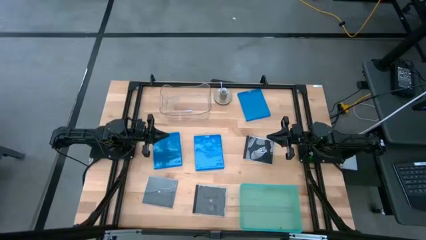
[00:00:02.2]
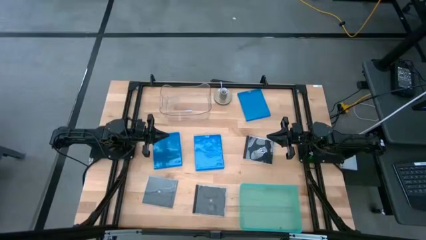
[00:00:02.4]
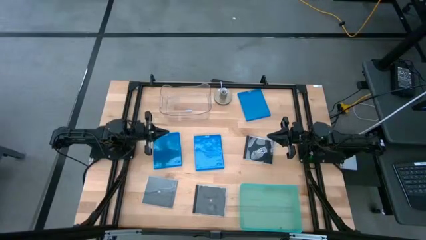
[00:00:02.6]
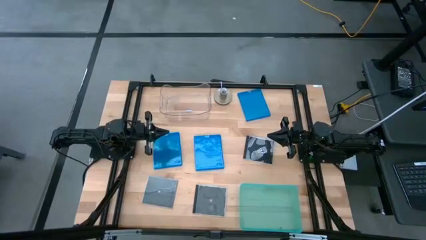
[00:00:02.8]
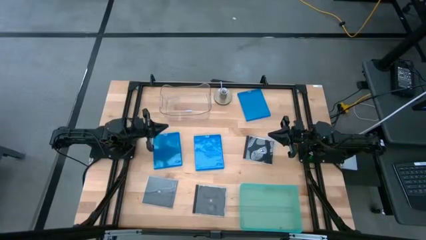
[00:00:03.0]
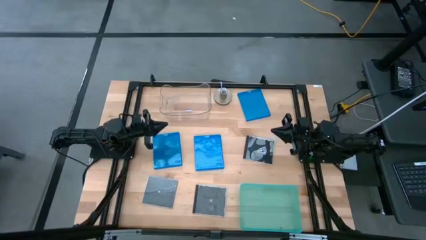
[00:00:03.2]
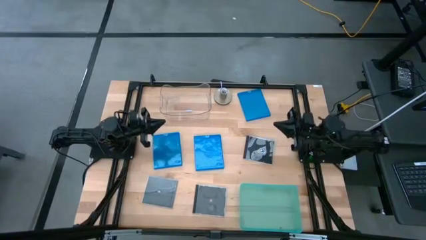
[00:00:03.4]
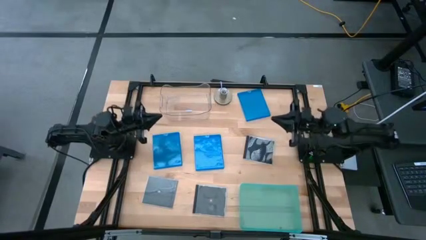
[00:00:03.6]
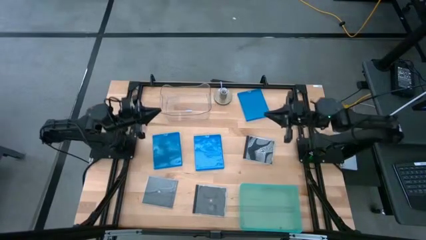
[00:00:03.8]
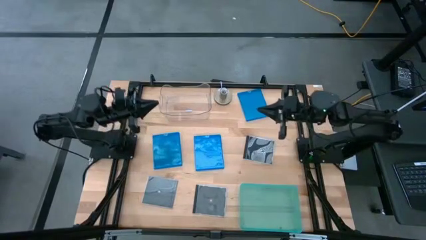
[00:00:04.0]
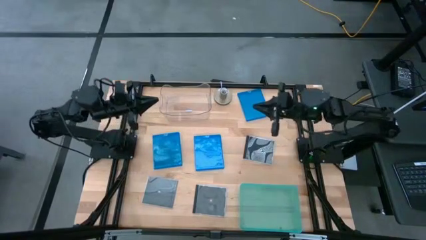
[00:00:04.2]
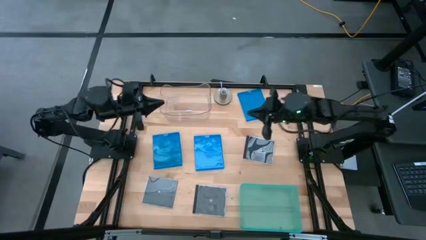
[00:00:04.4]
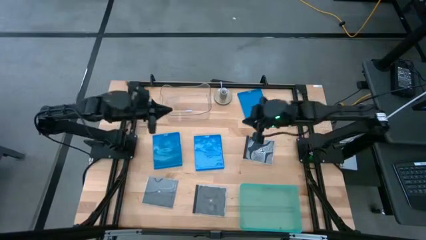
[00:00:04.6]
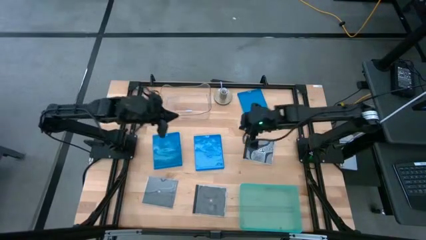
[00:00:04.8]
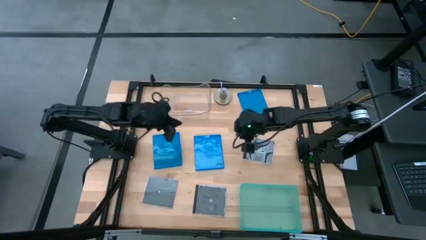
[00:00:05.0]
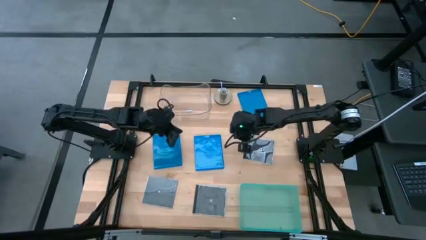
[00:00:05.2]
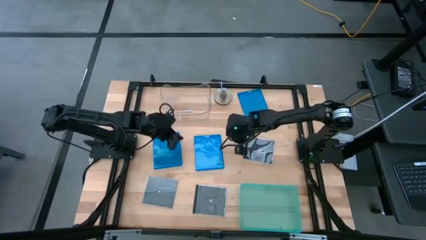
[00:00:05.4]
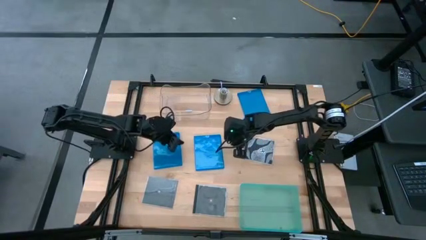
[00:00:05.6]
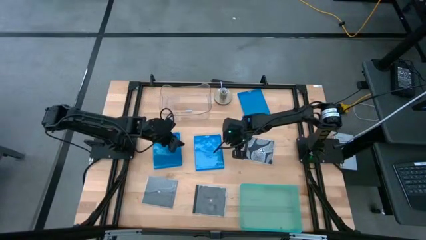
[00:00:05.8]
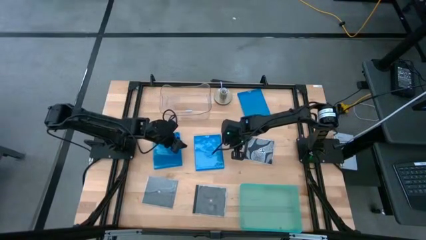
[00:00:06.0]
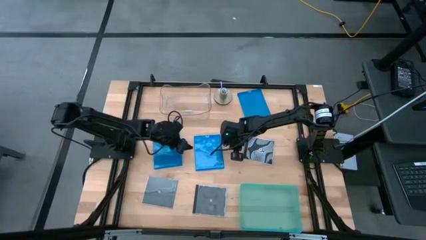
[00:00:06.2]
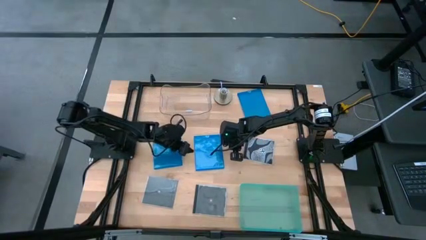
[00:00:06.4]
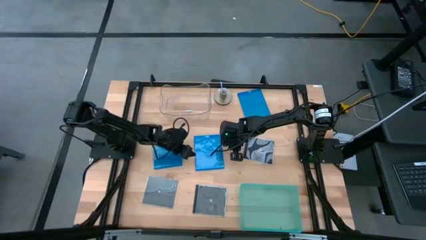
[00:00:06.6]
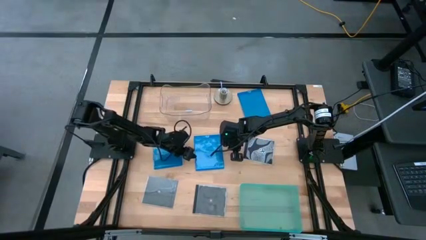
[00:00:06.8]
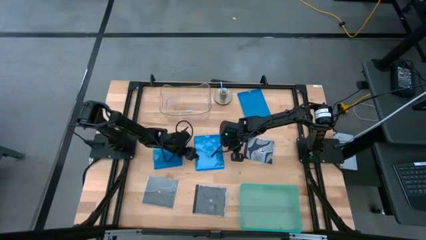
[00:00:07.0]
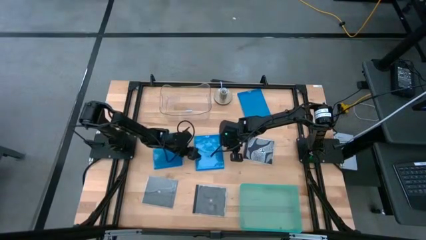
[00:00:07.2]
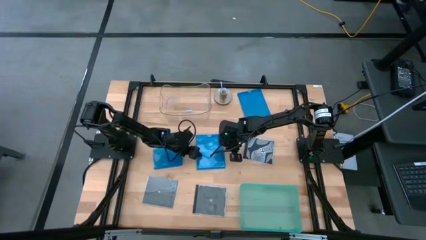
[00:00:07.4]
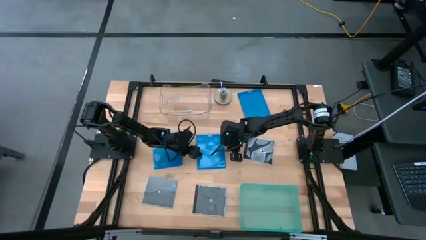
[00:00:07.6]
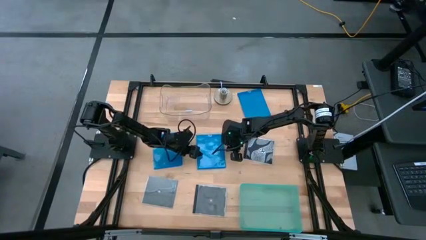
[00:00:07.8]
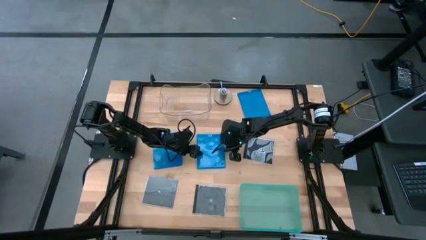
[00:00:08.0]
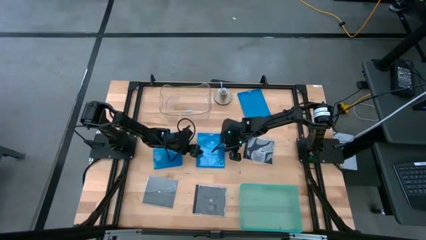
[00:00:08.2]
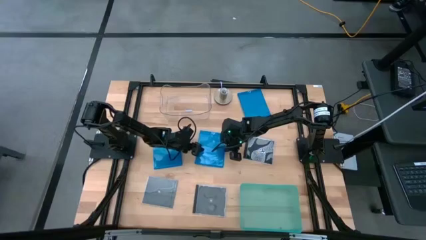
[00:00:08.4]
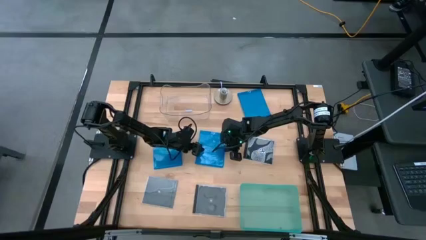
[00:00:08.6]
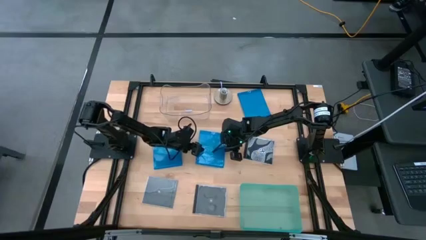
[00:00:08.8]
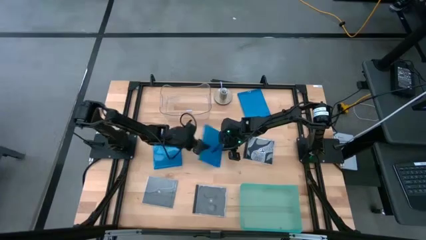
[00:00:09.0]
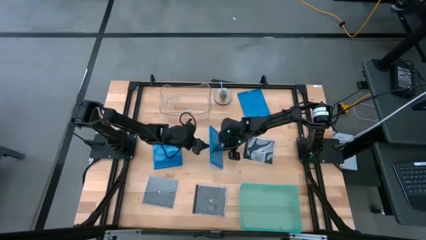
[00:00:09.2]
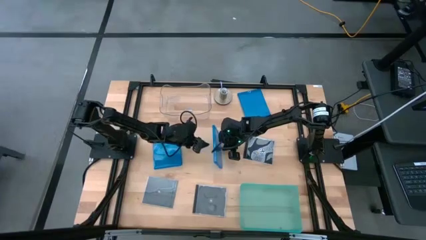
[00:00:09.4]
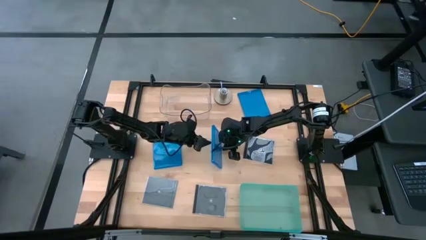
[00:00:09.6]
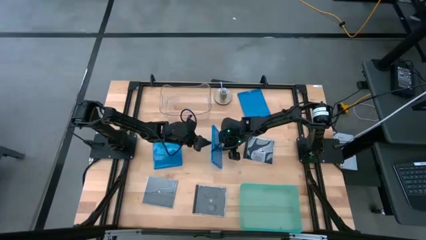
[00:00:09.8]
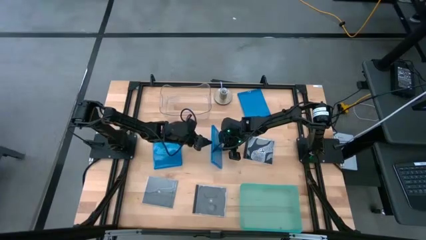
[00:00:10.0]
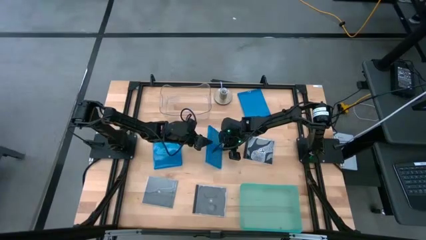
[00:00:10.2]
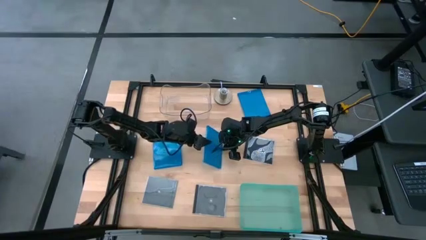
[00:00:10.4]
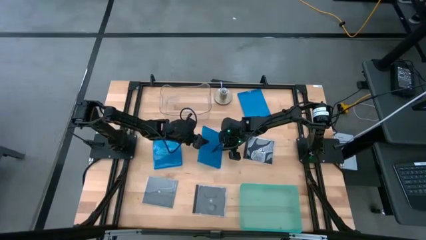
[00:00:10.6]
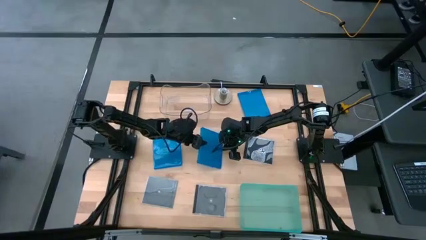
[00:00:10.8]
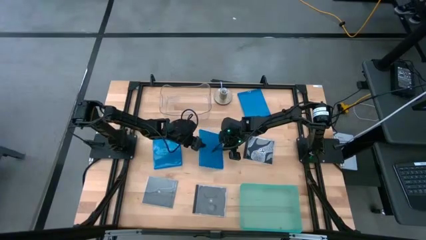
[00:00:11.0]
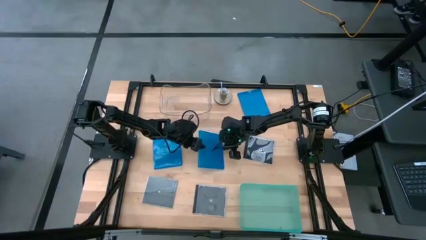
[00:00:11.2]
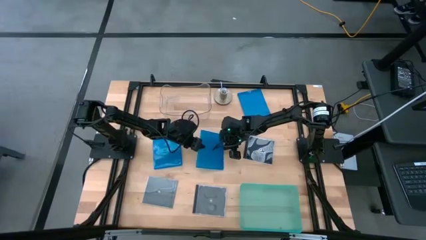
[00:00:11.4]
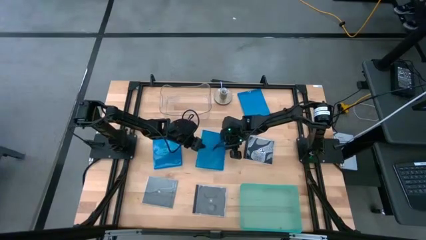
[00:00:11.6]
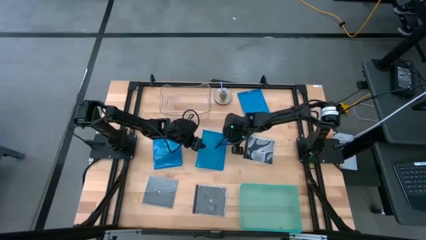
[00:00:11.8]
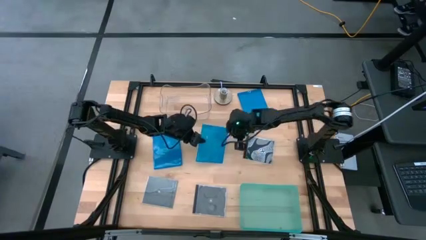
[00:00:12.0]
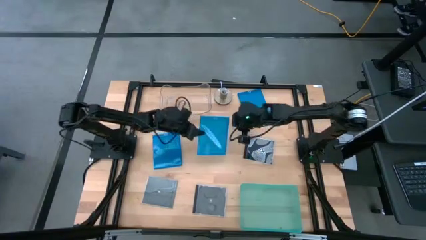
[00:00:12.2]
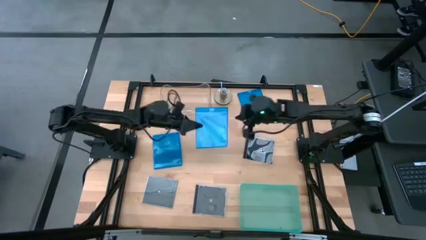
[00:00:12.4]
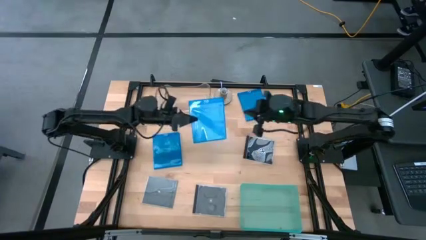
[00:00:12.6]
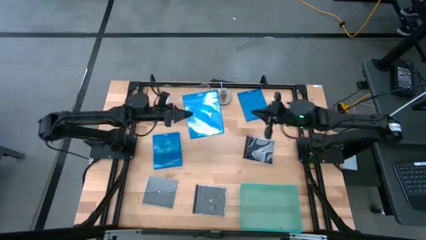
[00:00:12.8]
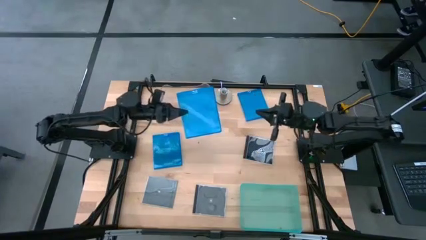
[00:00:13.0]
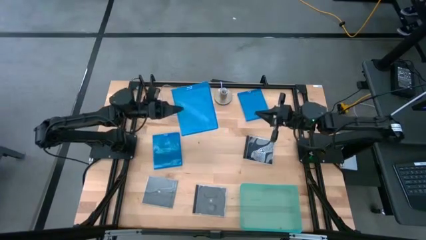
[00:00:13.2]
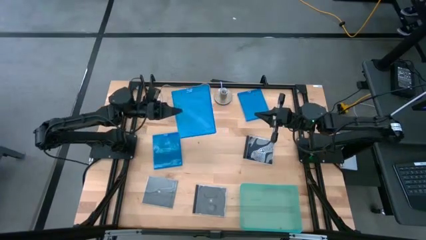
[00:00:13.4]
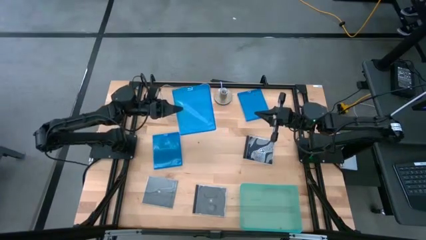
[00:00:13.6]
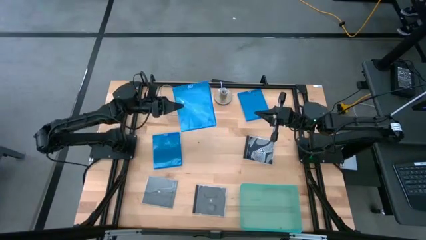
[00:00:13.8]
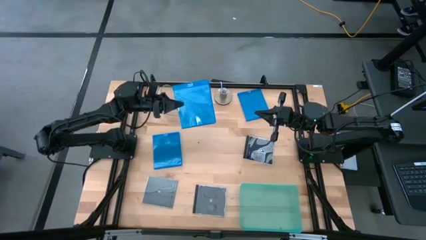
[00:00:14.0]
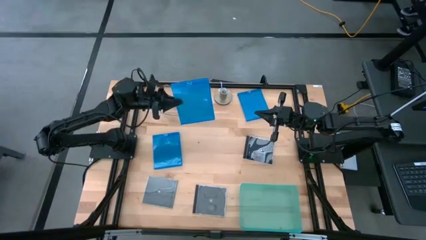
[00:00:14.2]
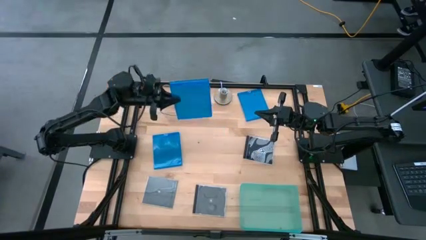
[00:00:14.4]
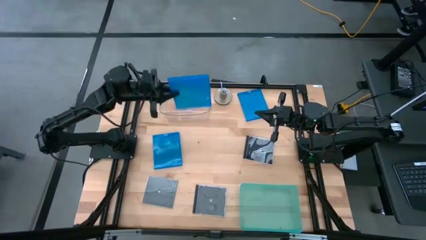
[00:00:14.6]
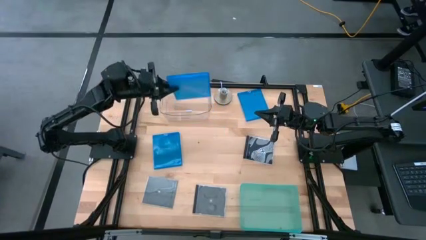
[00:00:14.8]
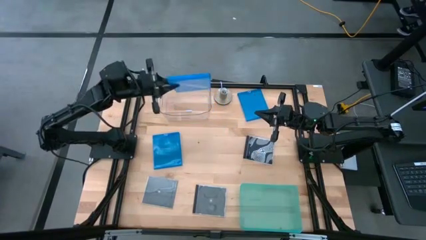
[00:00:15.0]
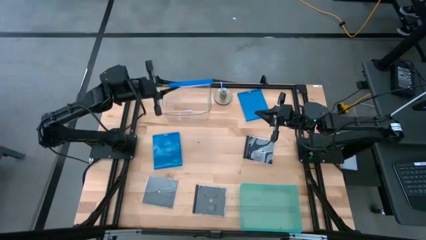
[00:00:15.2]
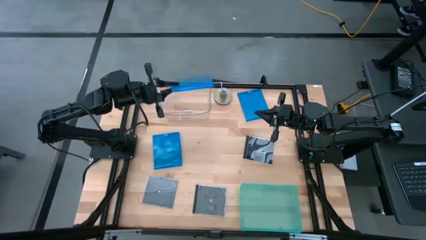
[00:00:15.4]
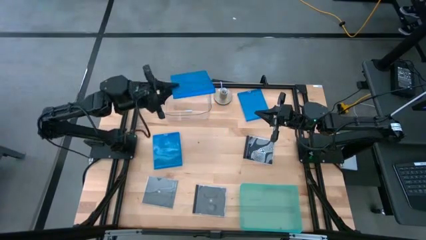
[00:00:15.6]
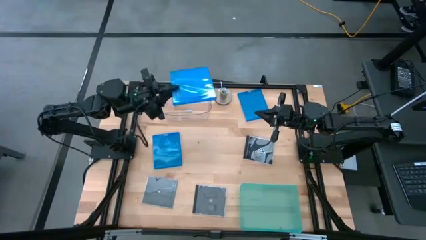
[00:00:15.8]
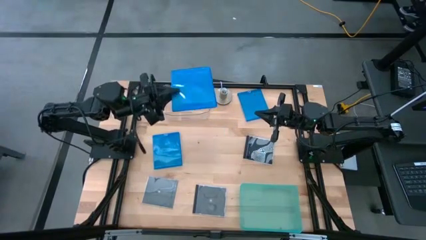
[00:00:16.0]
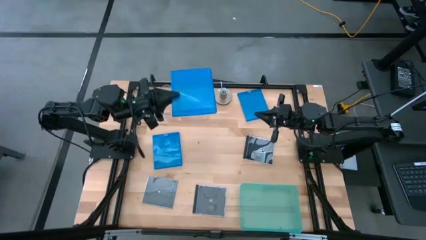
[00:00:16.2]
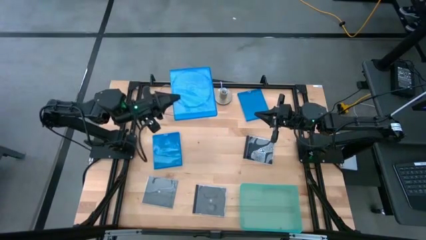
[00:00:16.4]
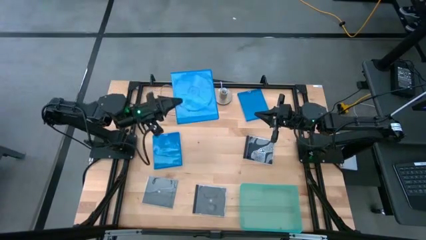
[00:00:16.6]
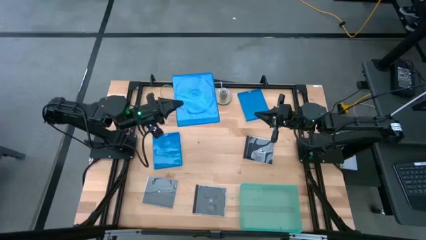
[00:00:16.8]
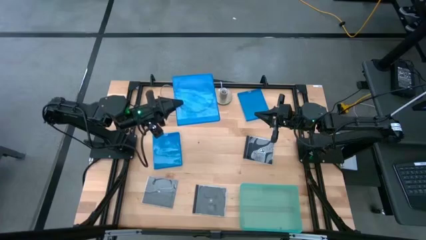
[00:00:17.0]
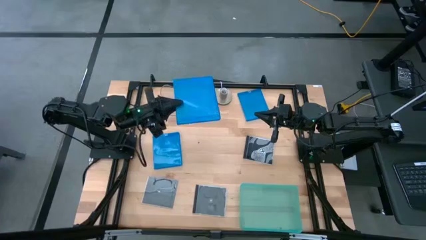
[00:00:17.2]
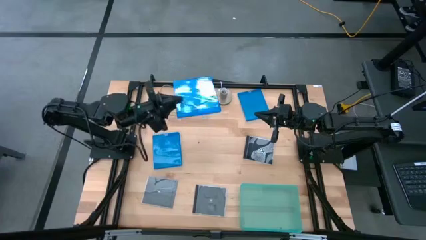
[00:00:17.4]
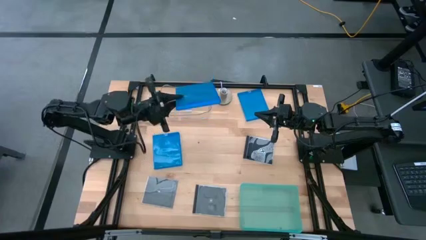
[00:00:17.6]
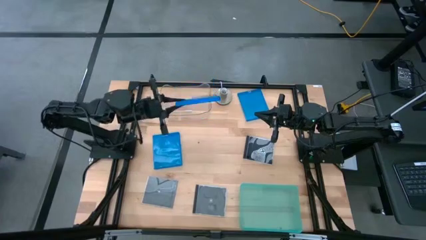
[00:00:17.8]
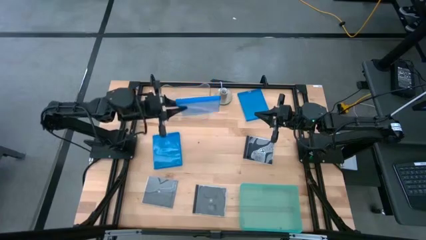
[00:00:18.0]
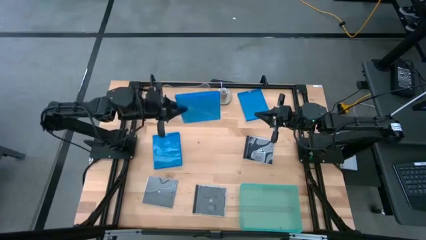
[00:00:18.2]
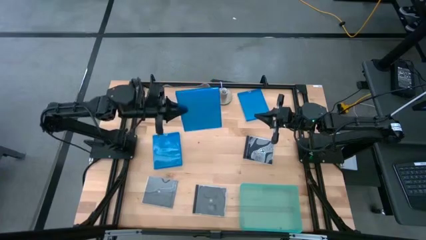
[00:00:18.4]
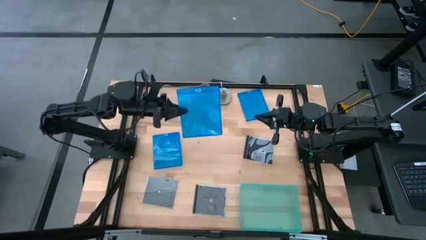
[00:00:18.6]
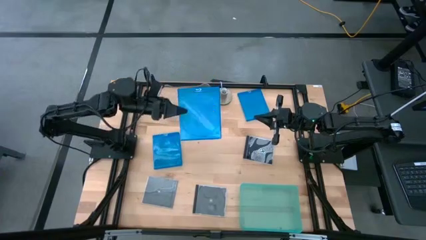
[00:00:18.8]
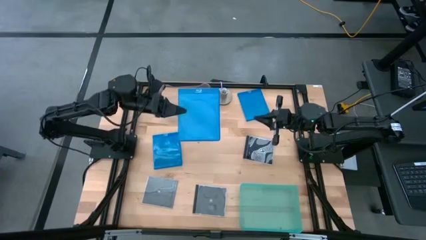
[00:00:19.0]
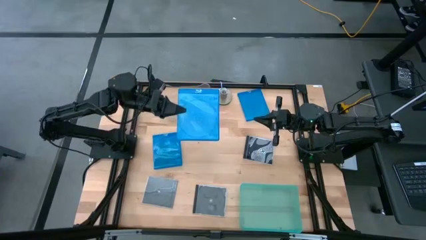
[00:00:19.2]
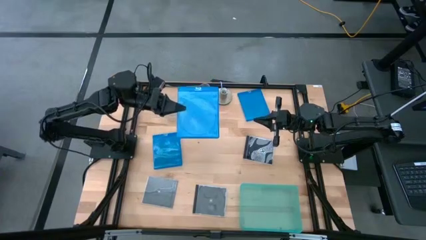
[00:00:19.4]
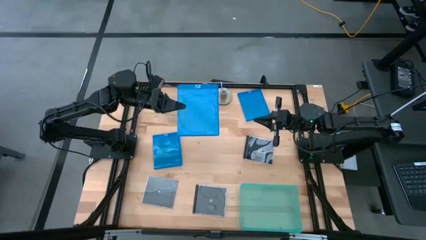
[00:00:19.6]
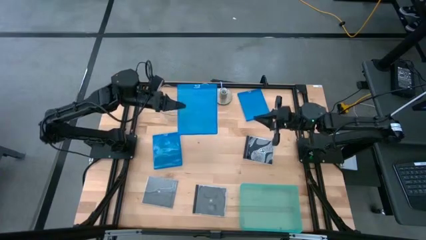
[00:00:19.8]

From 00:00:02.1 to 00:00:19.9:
Task: Pick & place jewel cases by type
Put the bottom right blue cd case into the green bin
